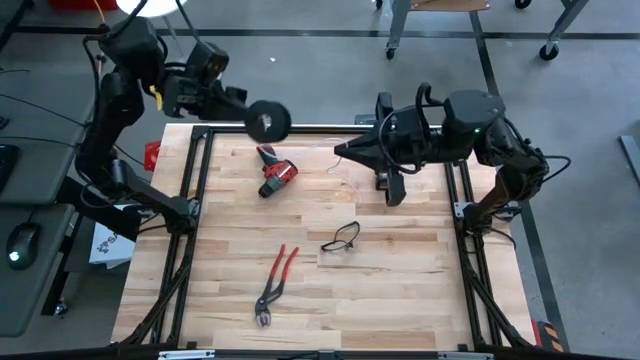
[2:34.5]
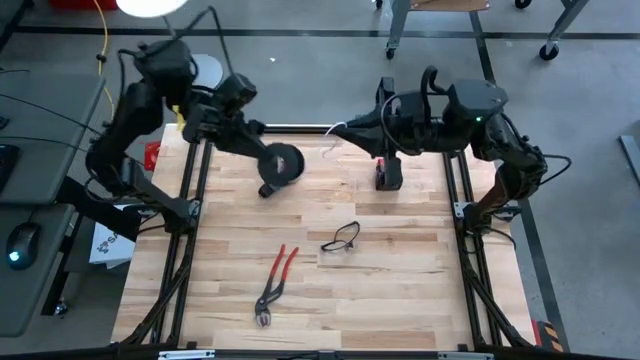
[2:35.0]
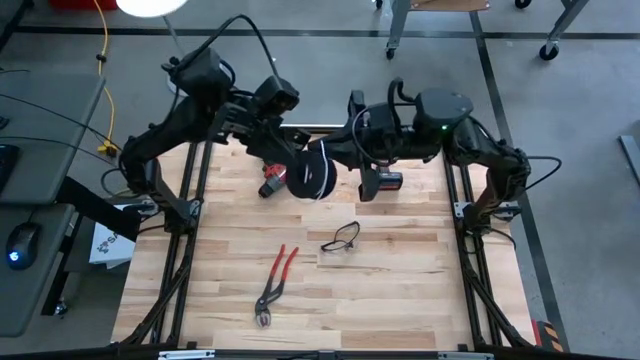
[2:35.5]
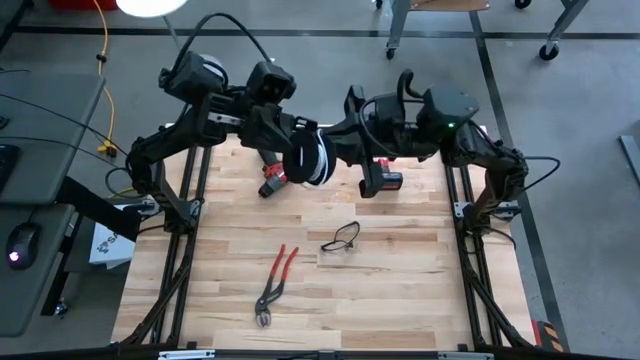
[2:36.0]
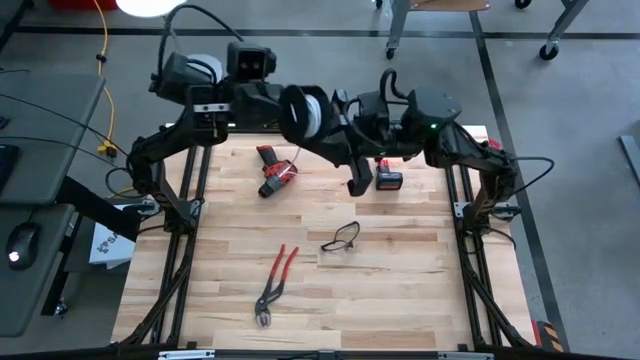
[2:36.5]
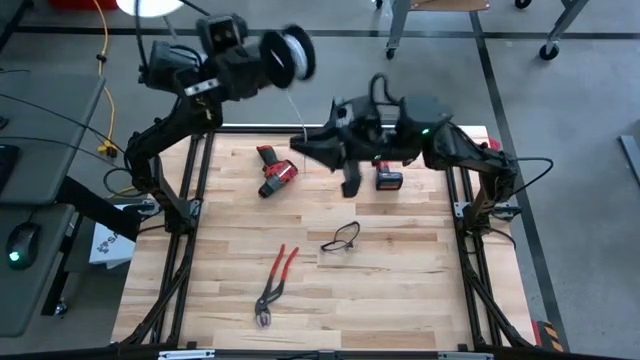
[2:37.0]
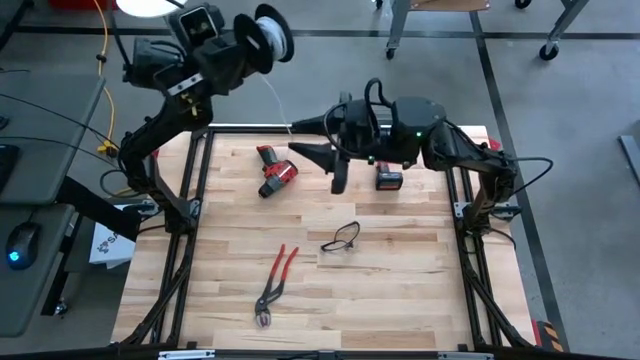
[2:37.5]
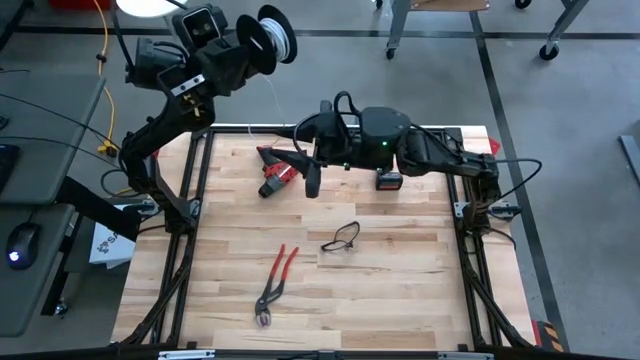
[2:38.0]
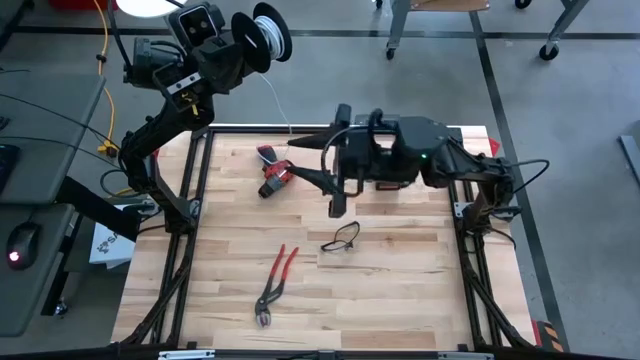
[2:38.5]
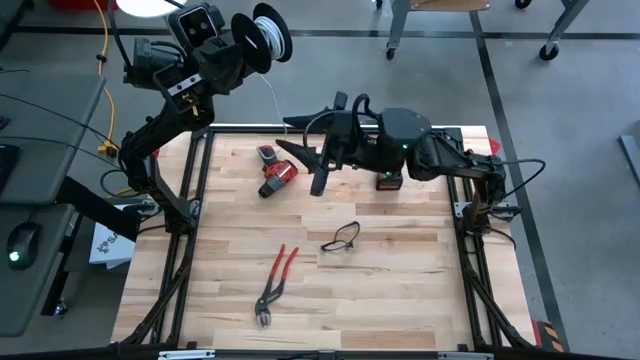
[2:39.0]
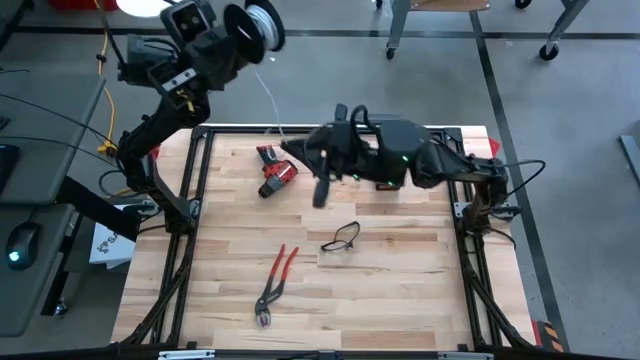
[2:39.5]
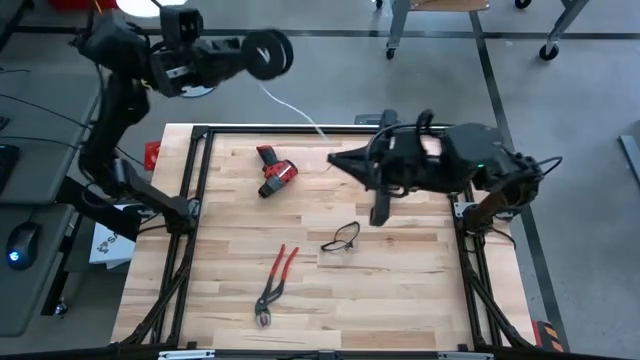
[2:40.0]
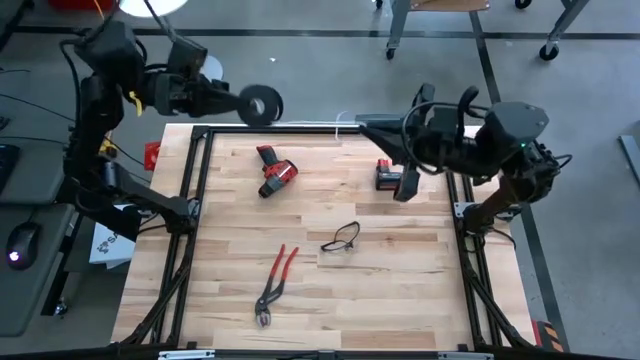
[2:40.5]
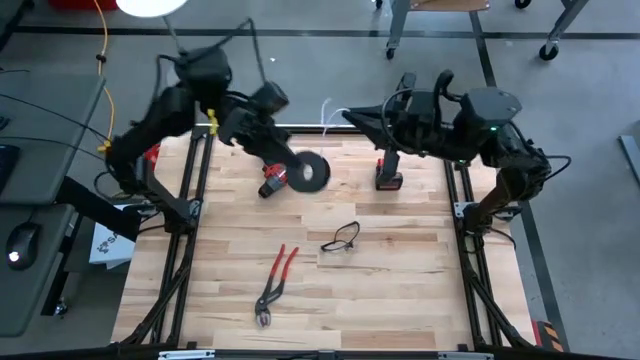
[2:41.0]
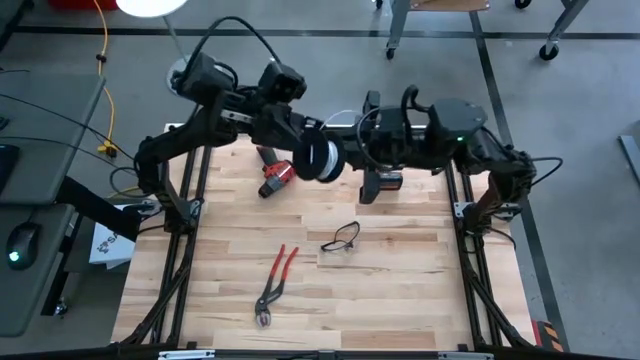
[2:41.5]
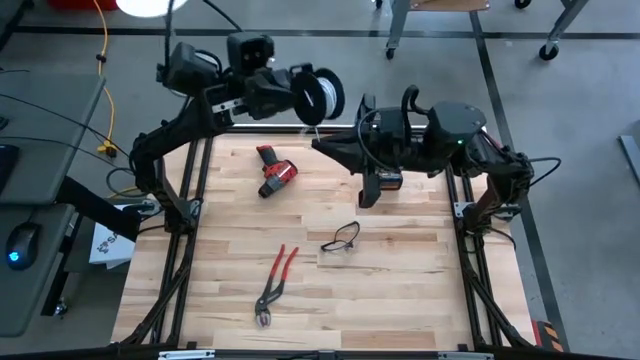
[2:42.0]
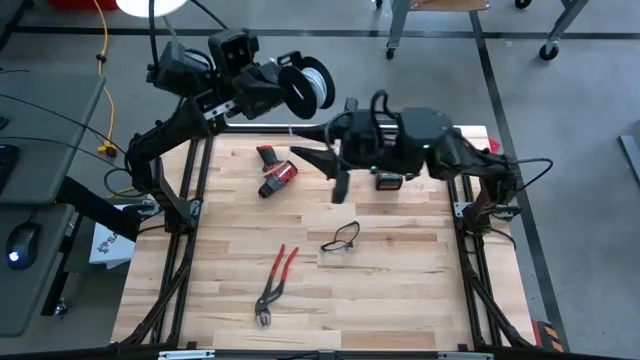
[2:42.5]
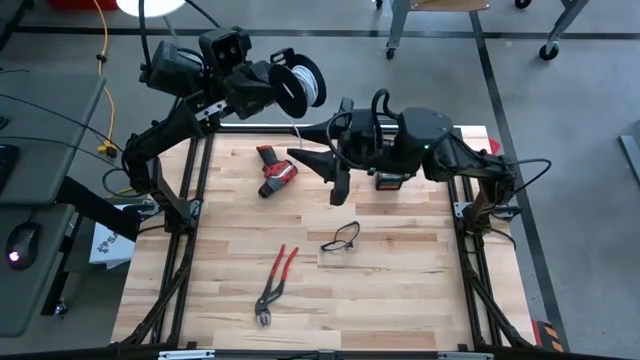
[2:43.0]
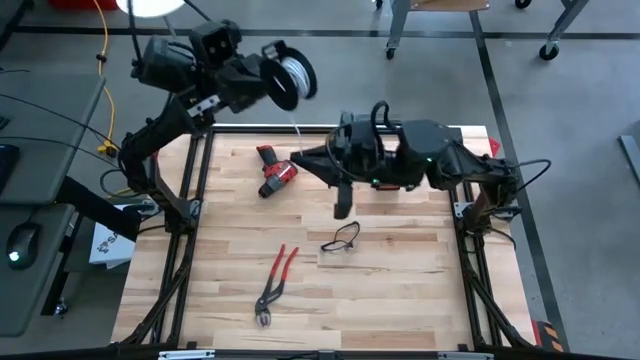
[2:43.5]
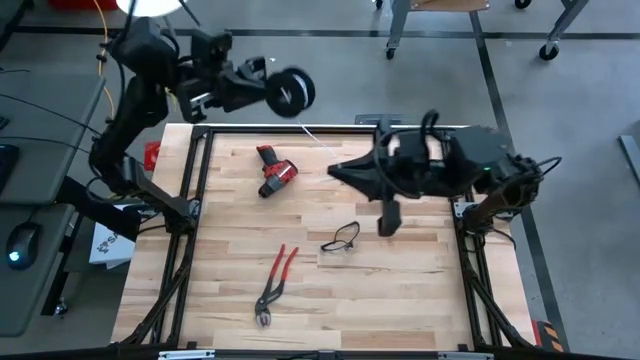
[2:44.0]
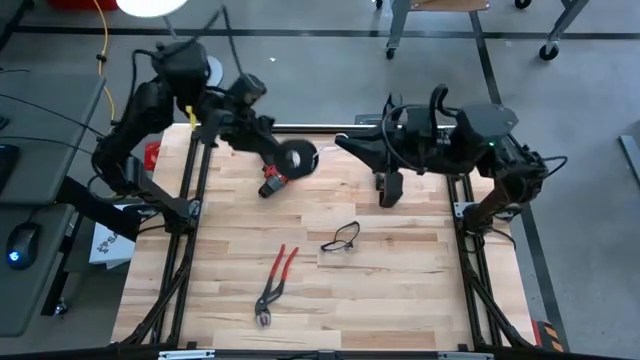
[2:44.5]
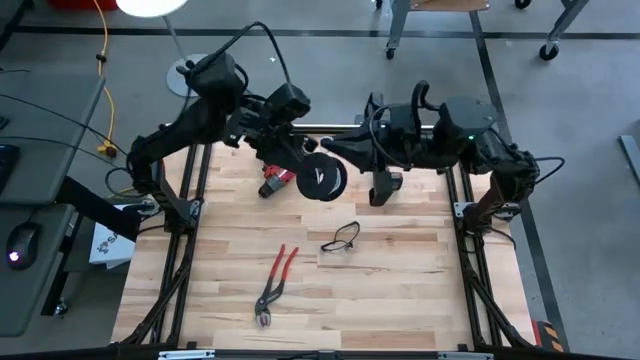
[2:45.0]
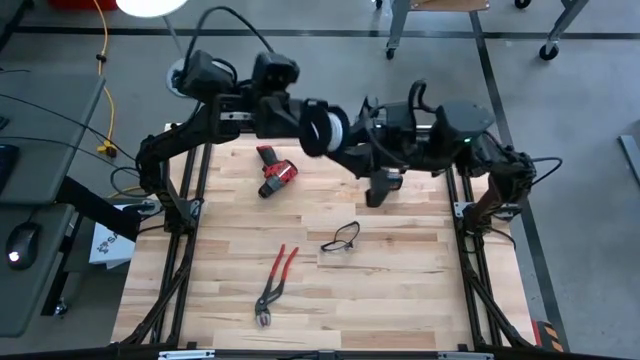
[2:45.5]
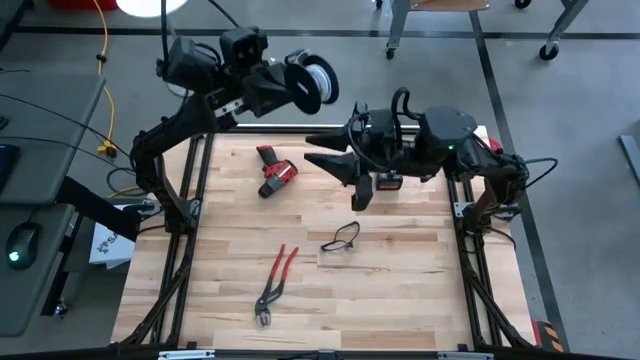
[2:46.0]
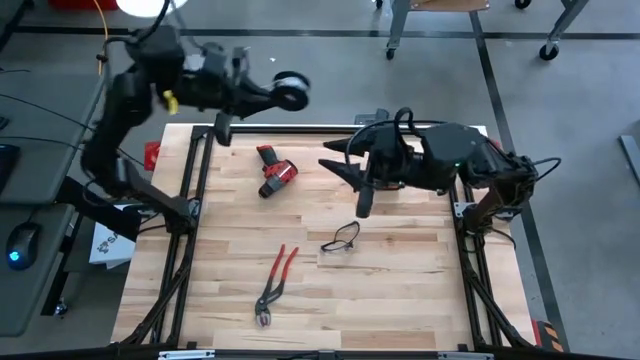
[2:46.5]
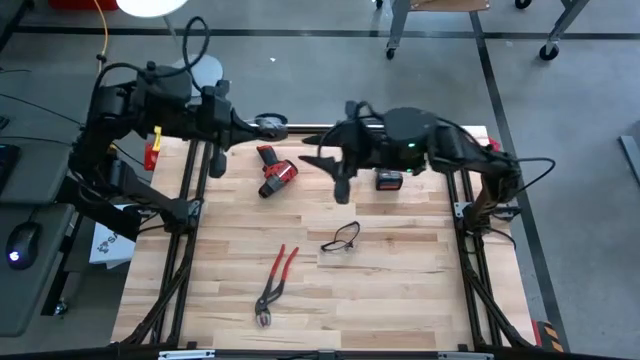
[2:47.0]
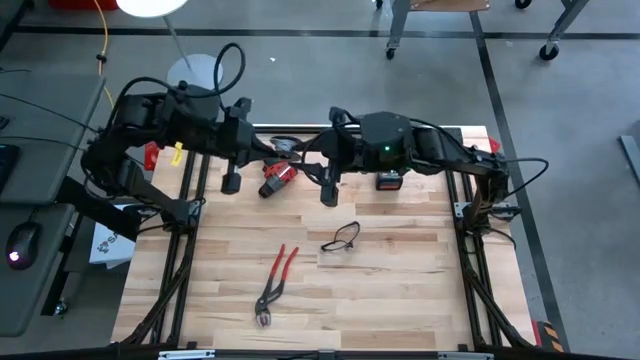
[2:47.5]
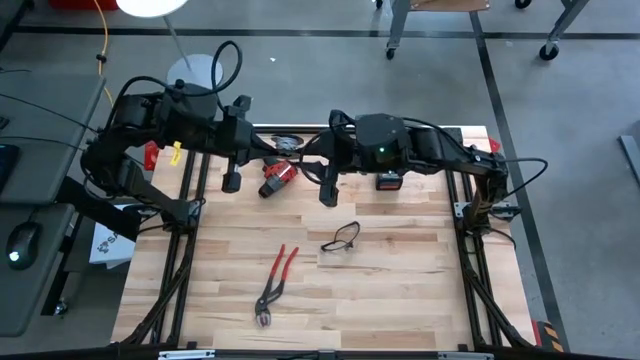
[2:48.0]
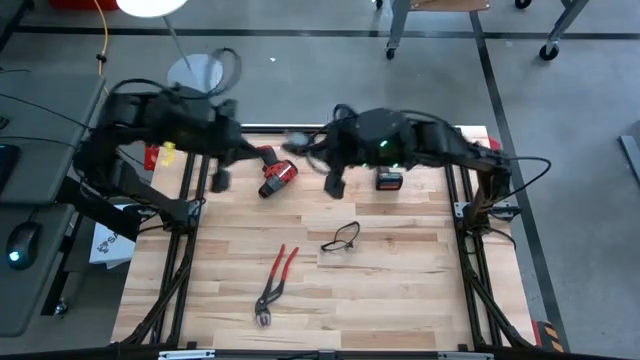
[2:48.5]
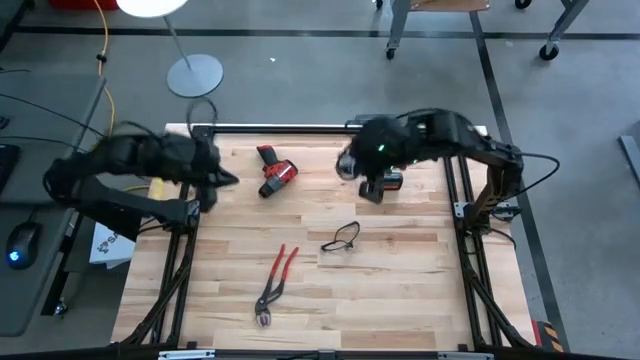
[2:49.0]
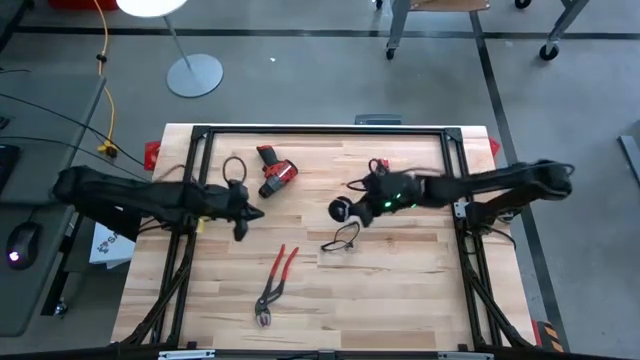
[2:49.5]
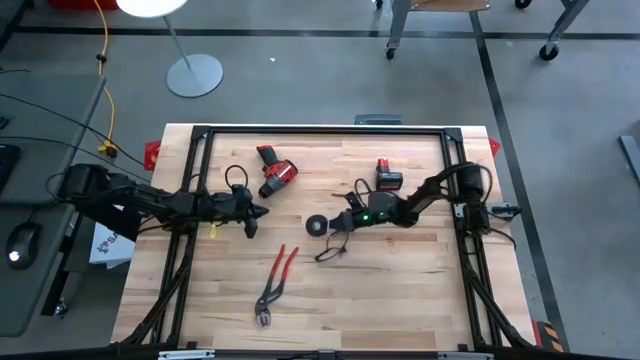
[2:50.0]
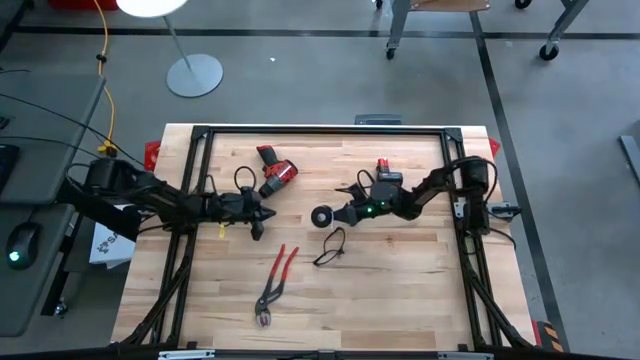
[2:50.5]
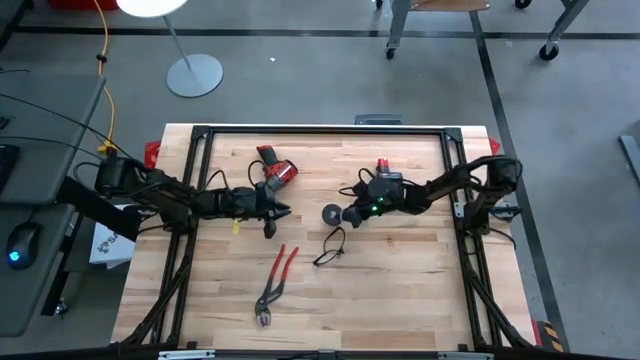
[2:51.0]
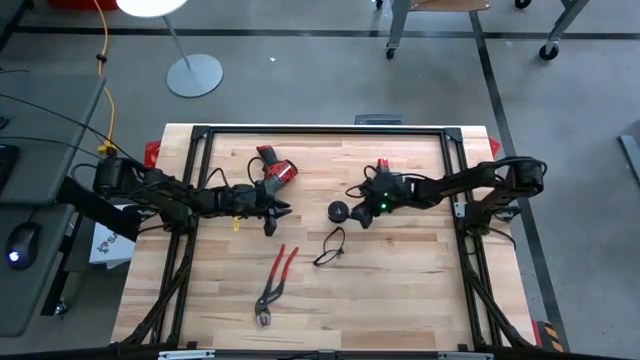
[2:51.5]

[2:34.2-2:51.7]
Task: Coil cords
Coil the white wire onto the black spool

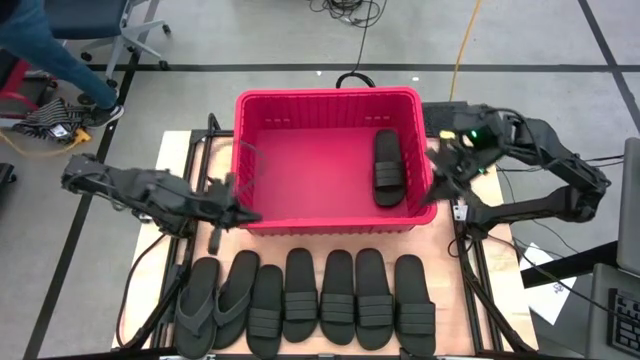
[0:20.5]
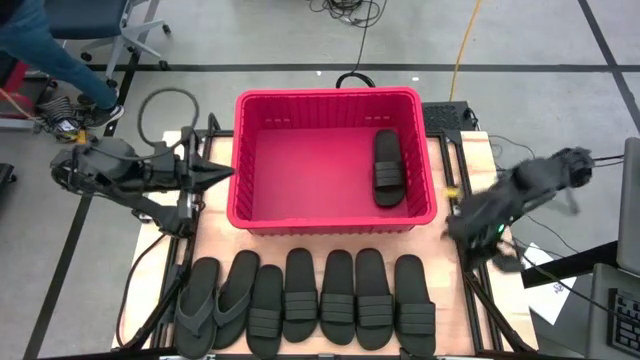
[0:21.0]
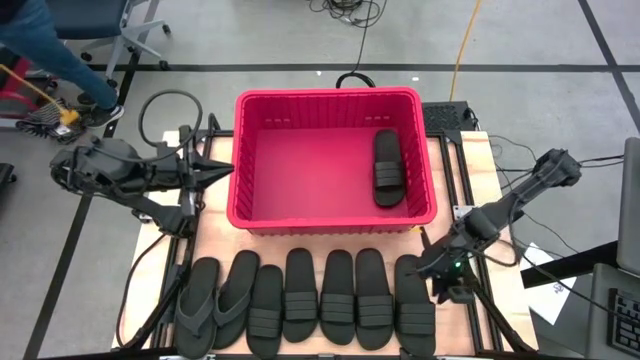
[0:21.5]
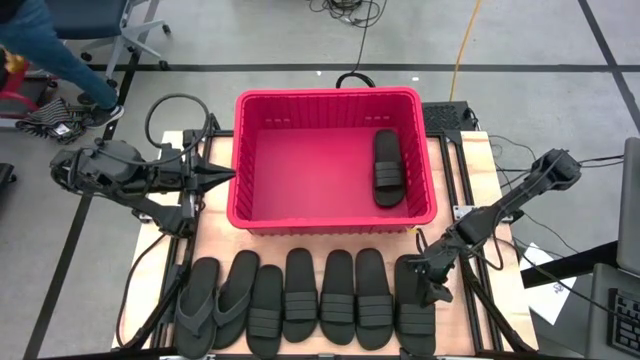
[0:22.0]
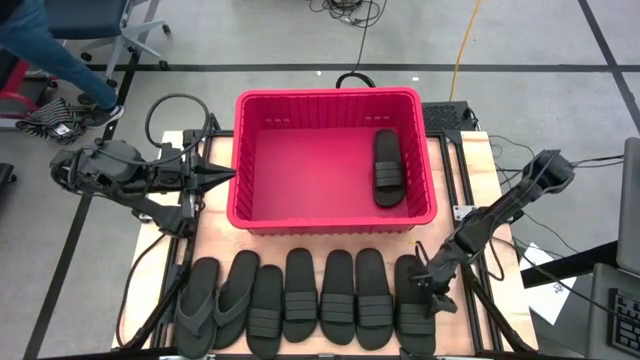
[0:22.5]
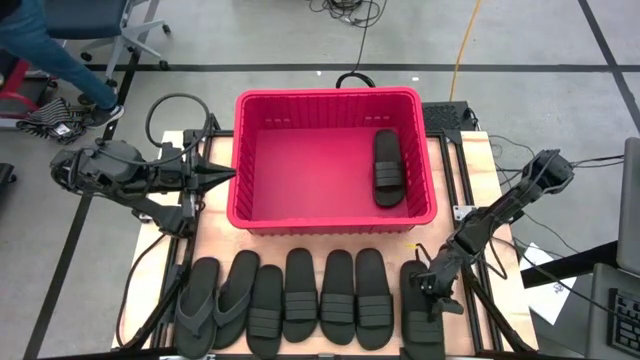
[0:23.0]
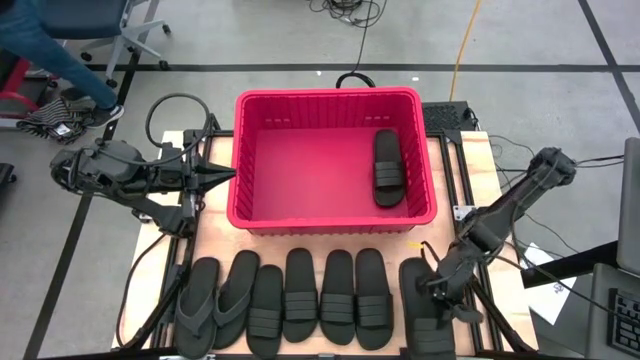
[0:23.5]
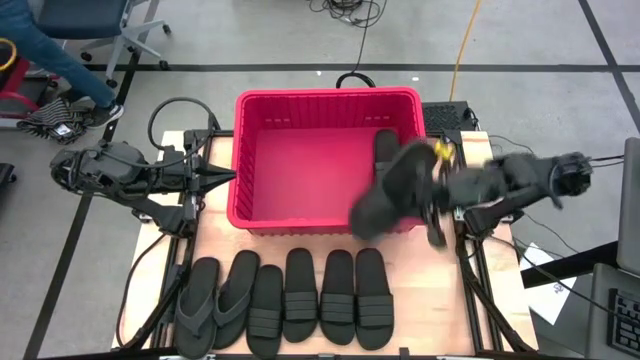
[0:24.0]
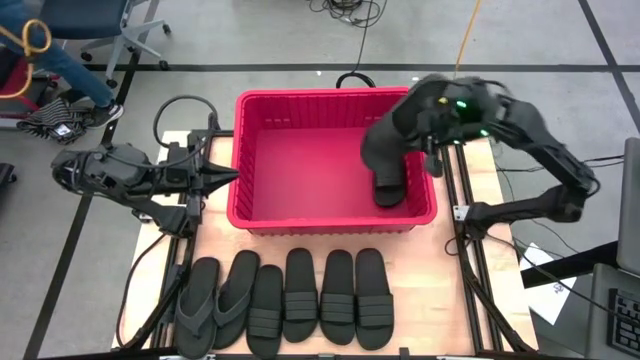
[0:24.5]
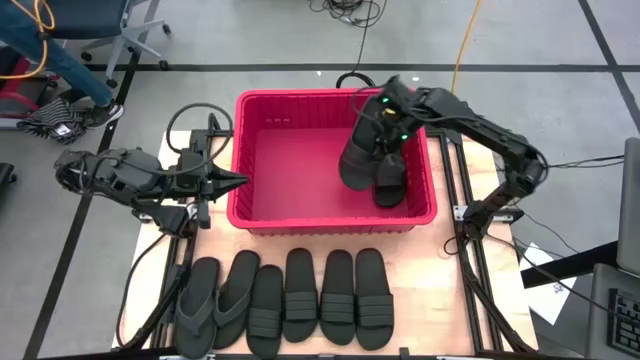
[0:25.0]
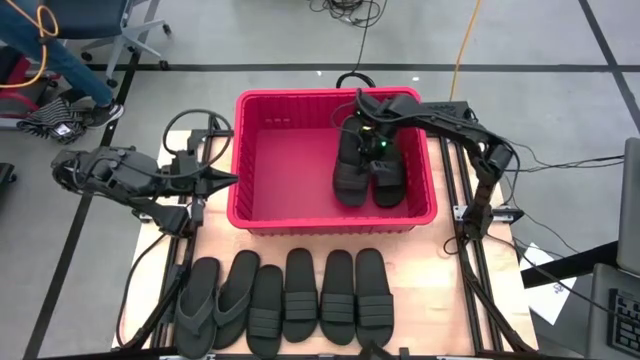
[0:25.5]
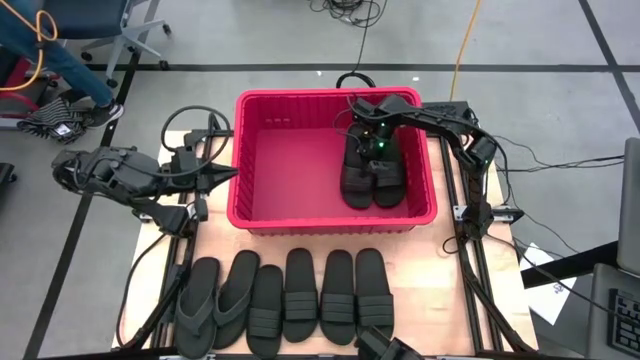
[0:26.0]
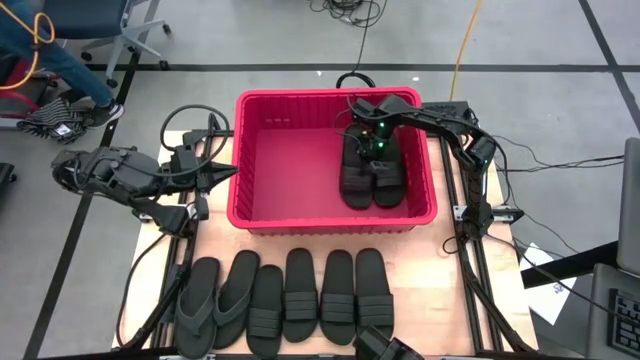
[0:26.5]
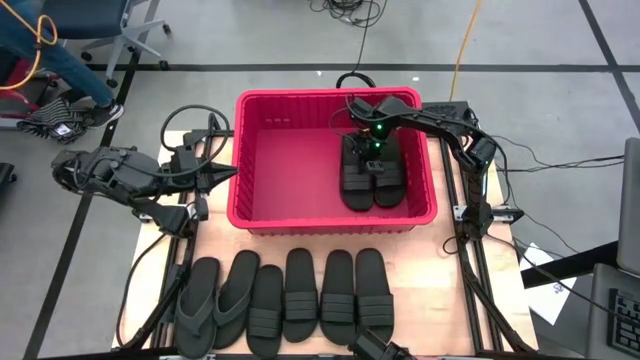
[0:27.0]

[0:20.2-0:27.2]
Task: Pick and place slides into bin
Put the black slide into the red bin
